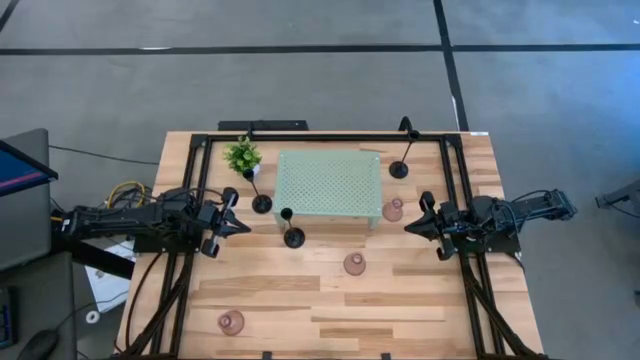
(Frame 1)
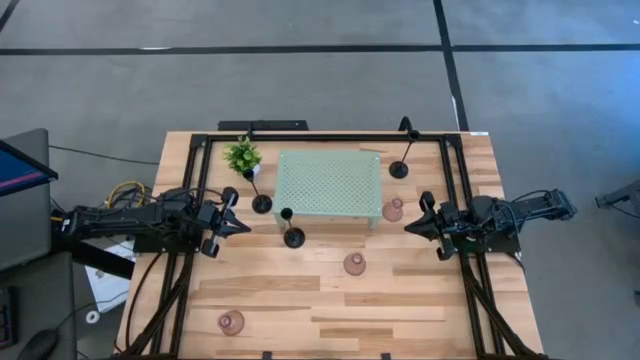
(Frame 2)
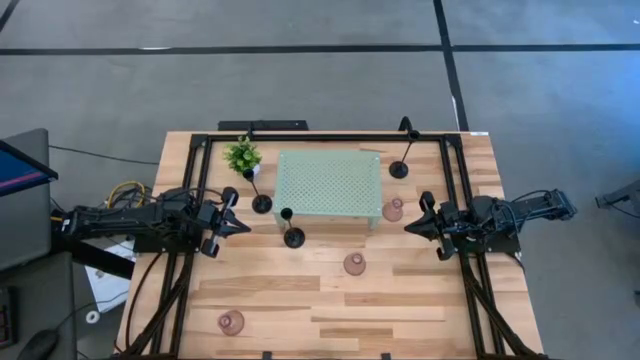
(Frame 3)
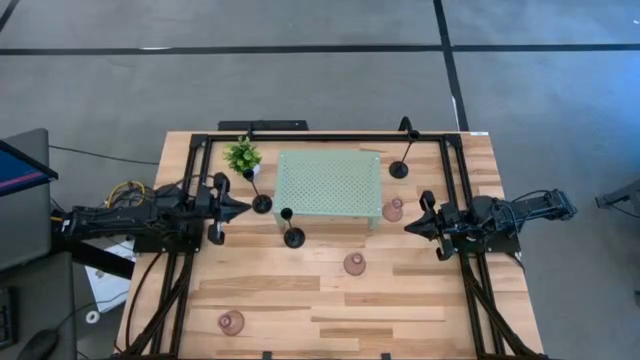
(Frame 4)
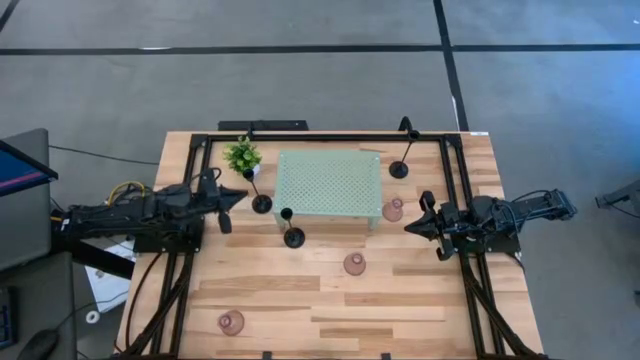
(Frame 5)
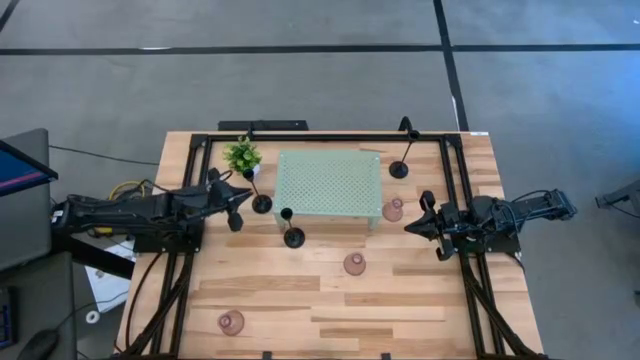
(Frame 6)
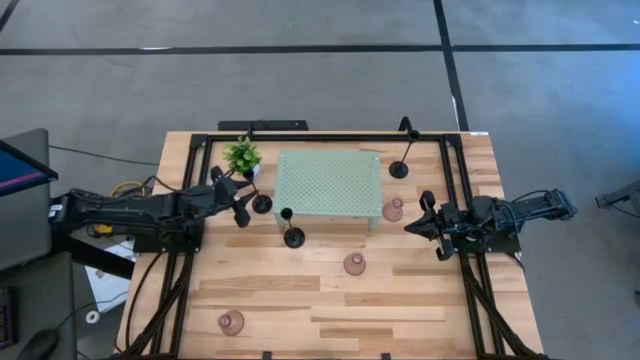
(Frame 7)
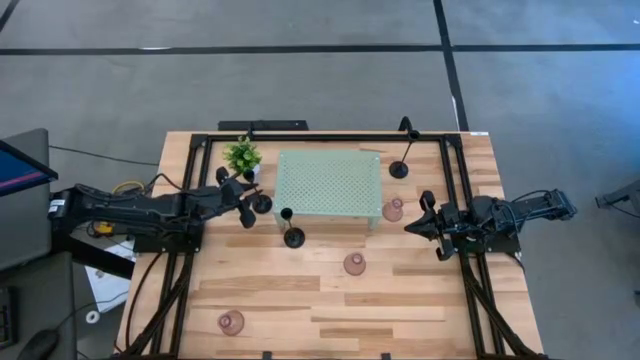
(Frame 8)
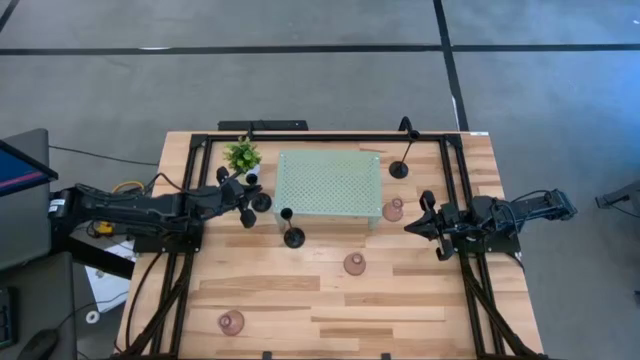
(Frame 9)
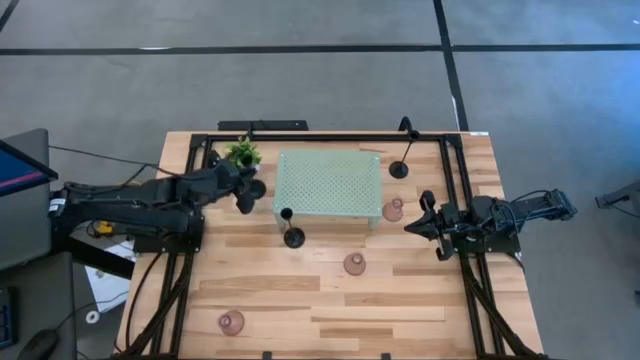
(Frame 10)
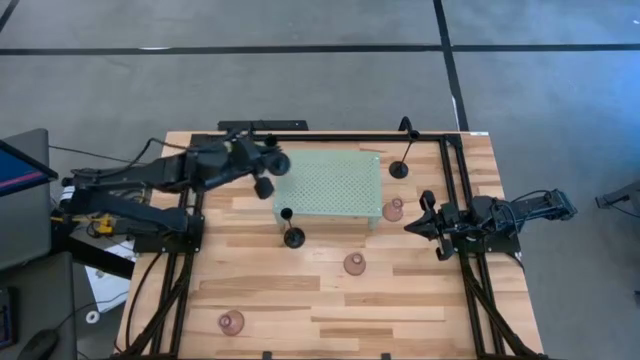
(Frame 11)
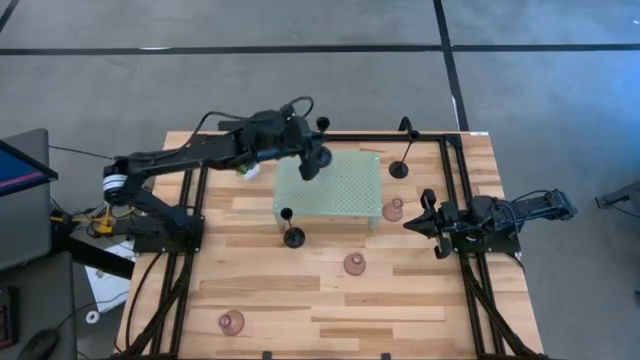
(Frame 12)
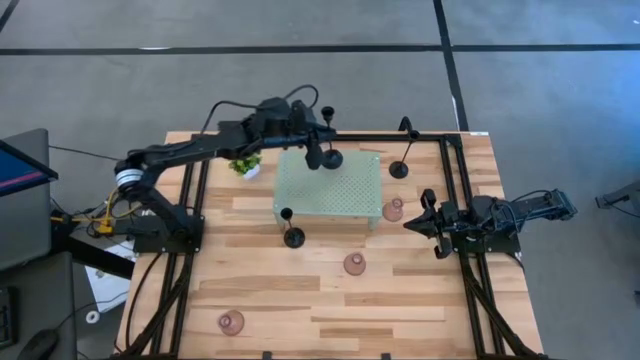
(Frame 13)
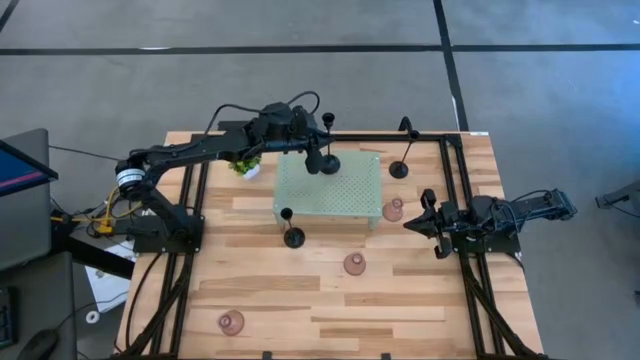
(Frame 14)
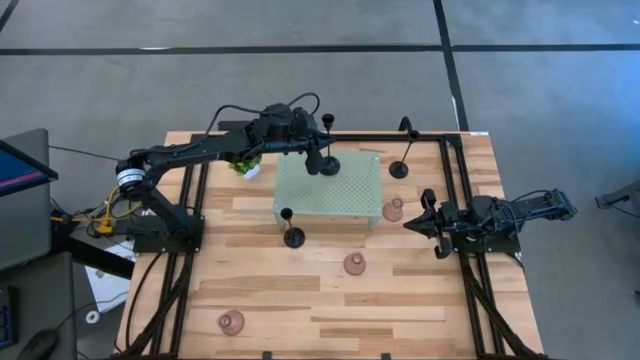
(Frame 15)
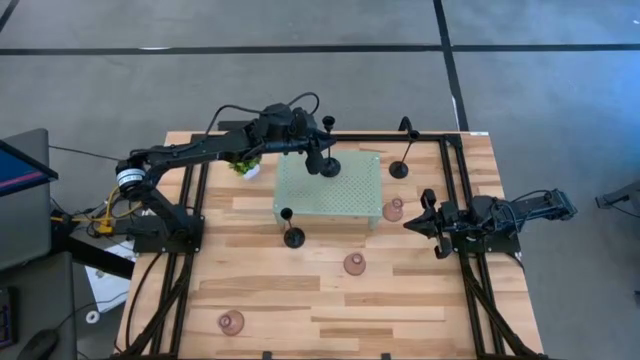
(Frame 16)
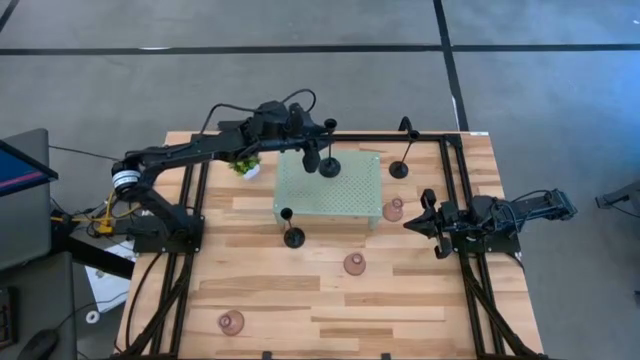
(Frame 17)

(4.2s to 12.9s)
Task: Pick & Place candle stick holders
Put the left black candle holder on the shelf

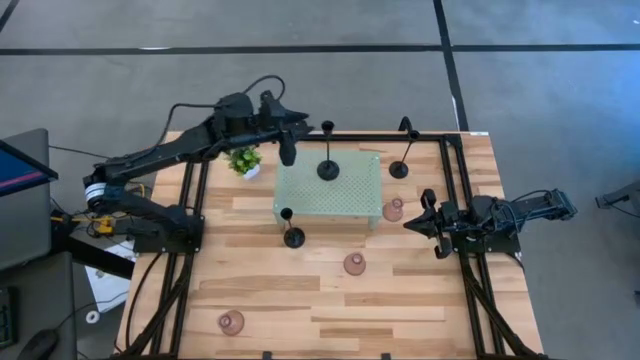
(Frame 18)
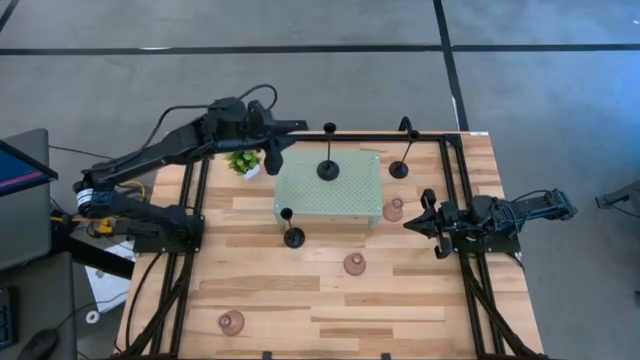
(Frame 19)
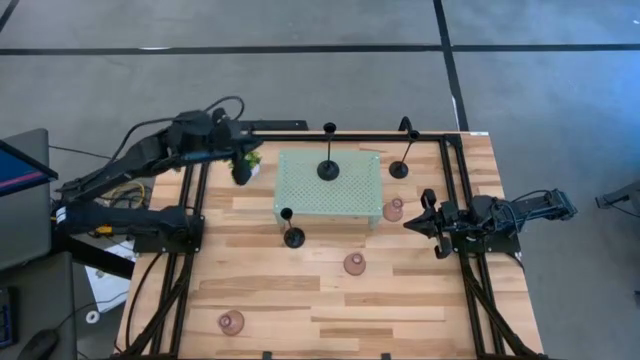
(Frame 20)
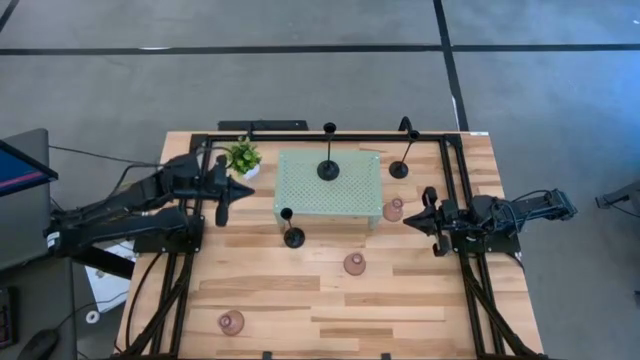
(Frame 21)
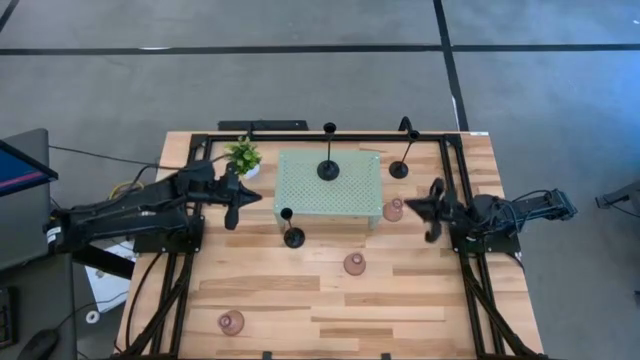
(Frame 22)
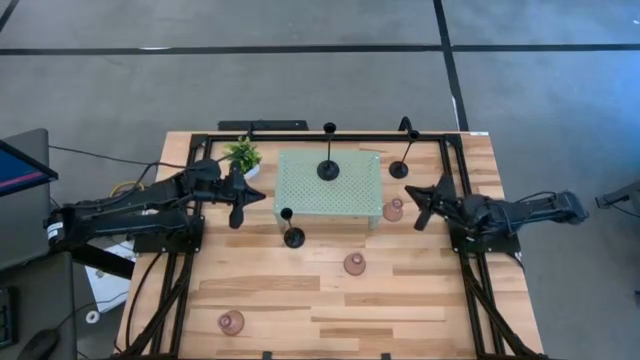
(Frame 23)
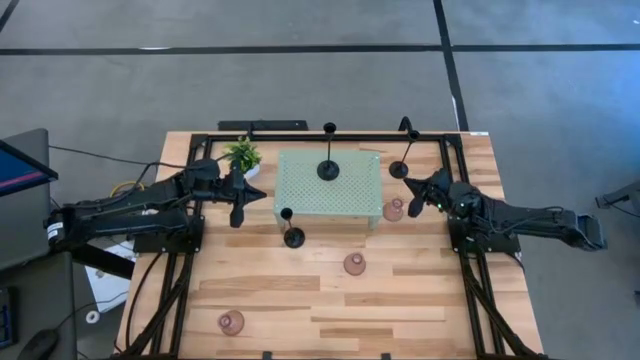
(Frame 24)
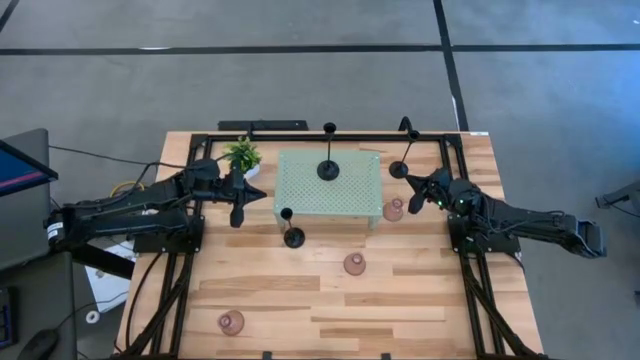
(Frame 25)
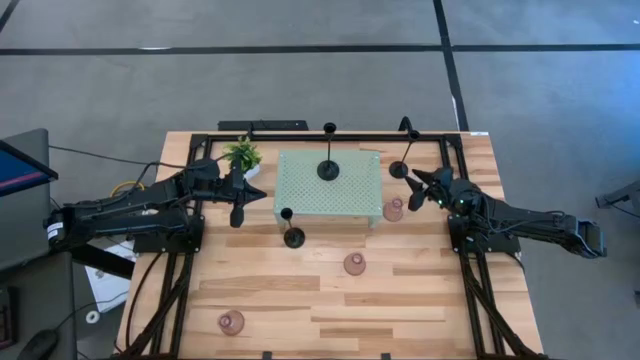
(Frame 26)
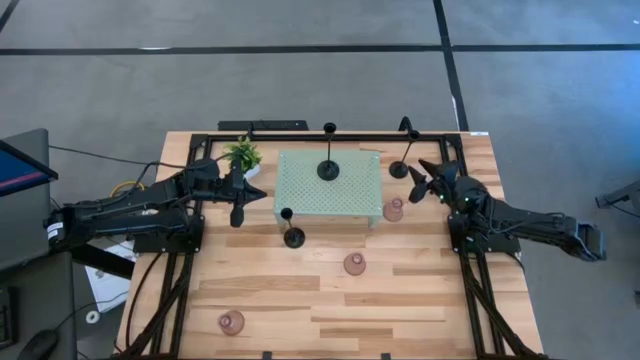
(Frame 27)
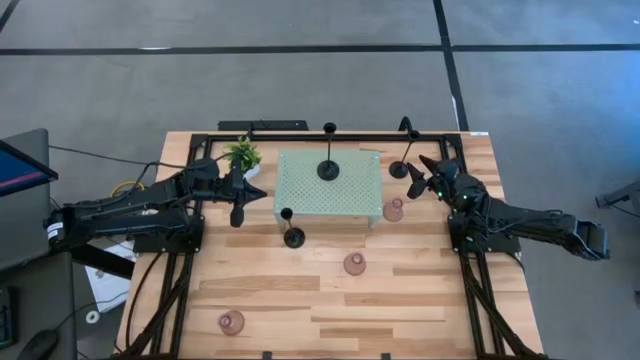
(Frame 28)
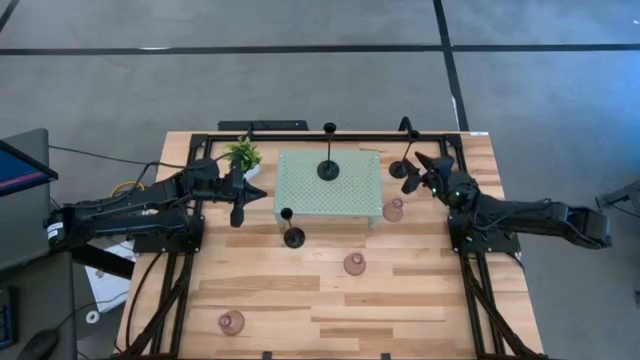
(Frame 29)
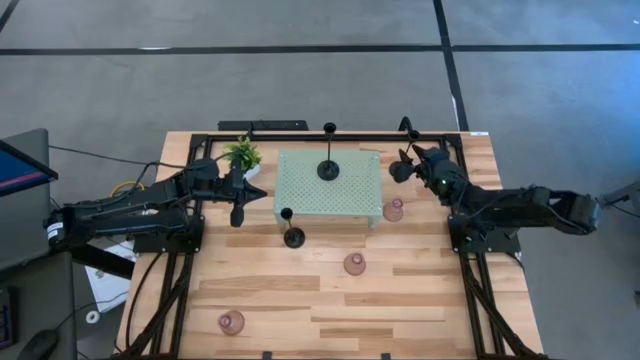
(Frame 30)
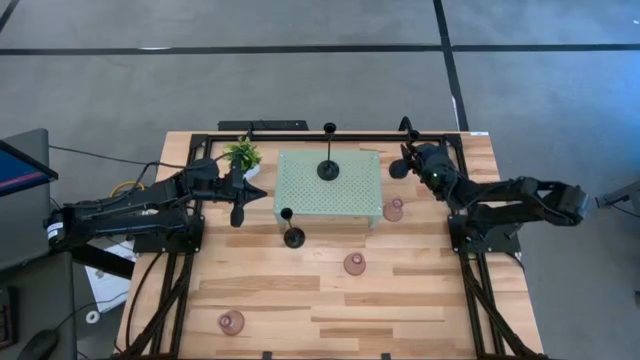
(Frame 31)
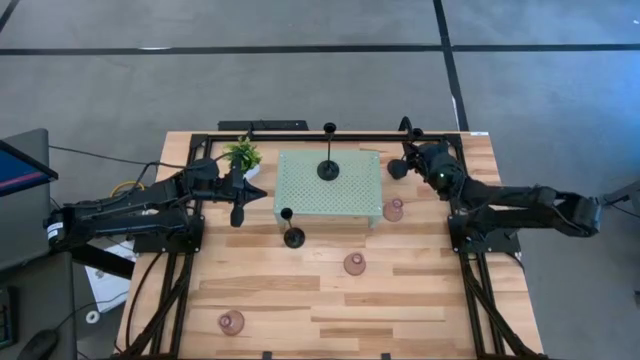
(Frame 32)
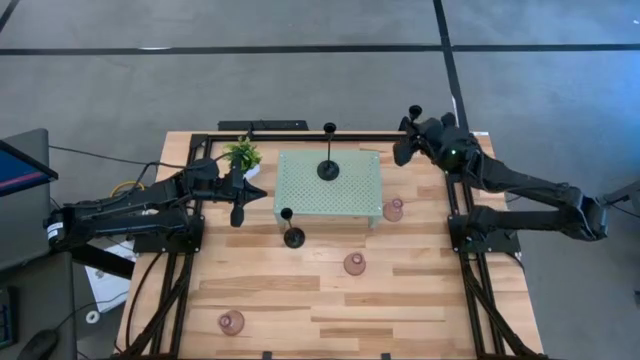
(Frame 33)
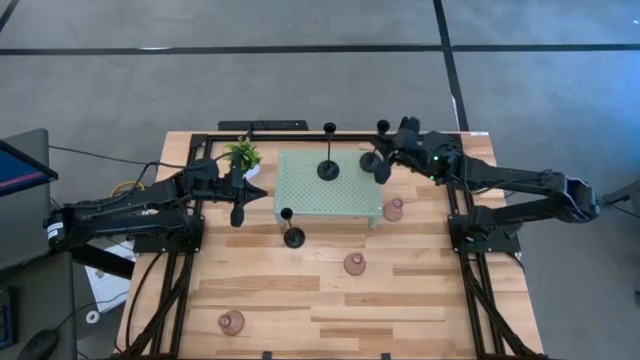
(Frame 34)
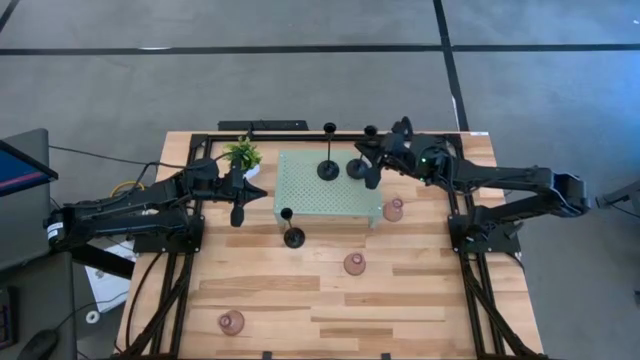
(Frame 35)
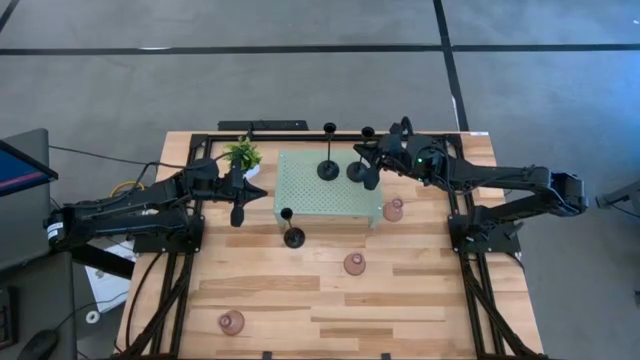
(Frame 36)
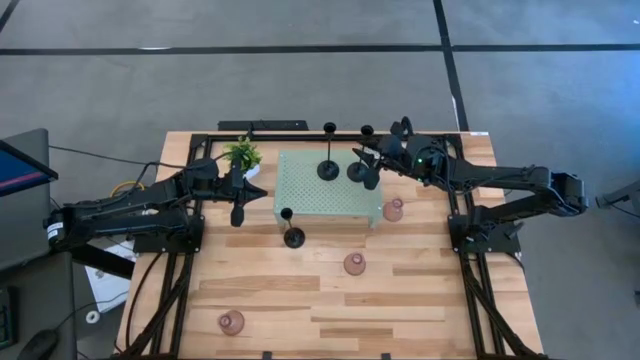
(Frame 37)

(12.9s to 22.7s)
Put the top black candle holder on the shelf

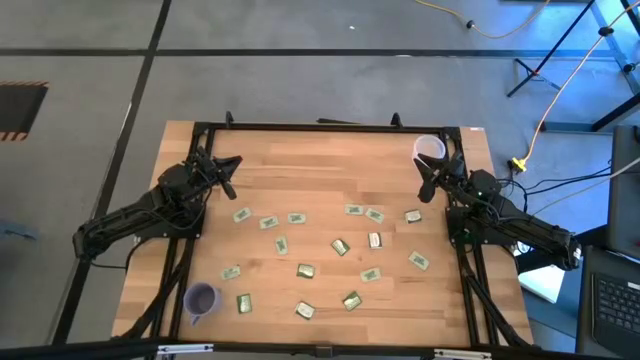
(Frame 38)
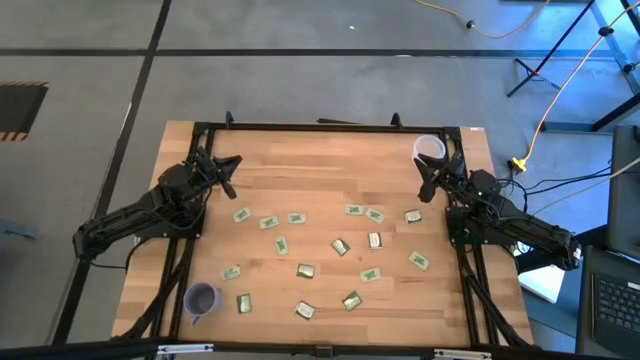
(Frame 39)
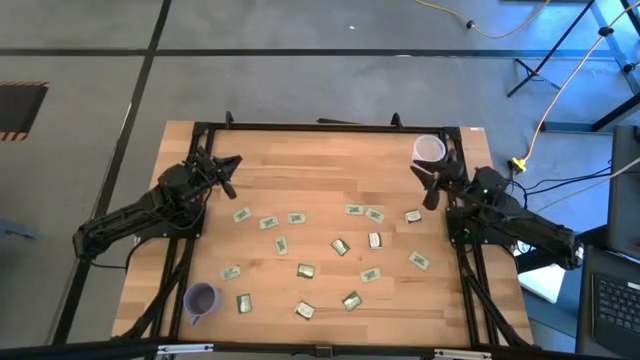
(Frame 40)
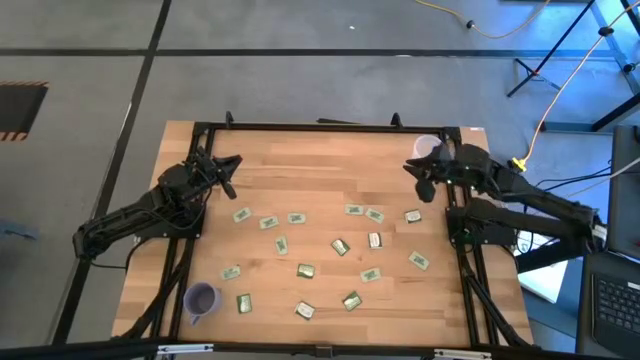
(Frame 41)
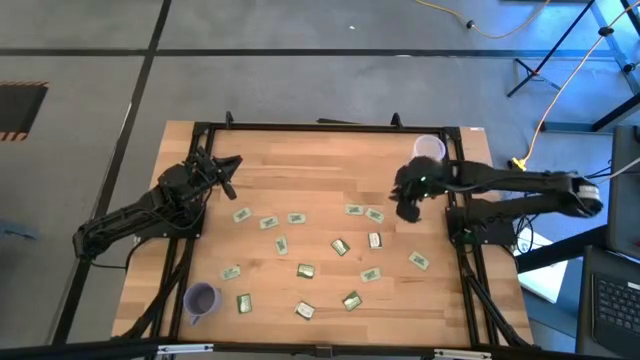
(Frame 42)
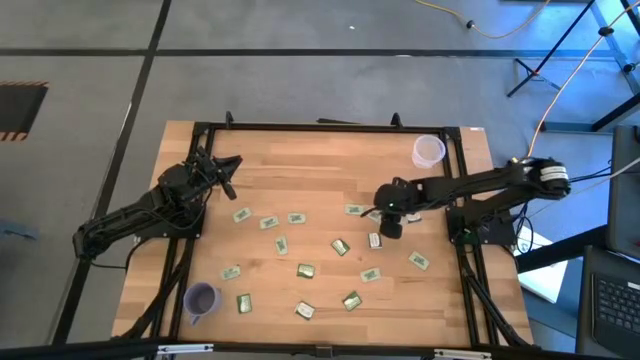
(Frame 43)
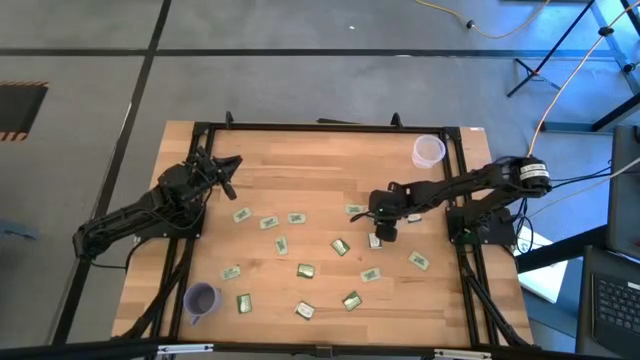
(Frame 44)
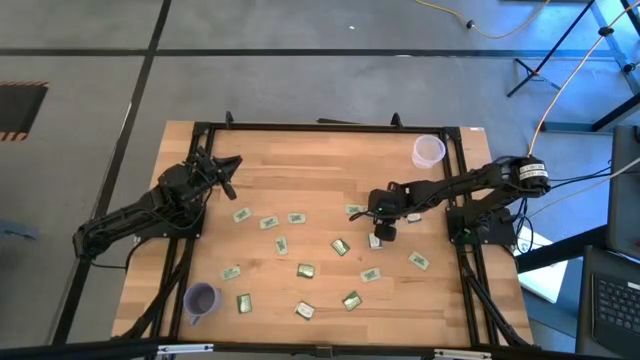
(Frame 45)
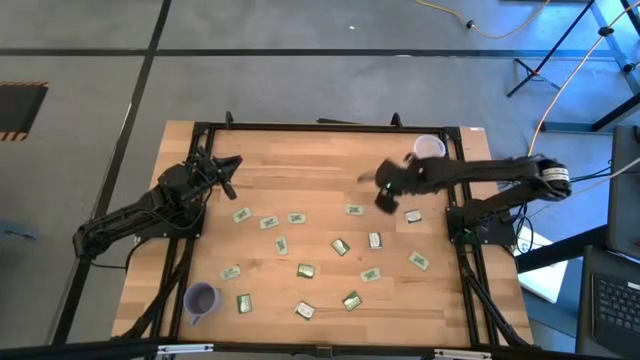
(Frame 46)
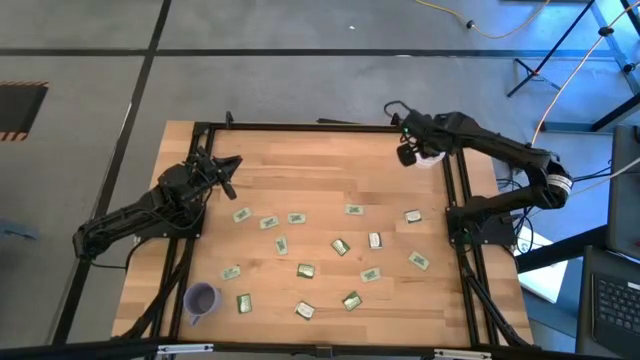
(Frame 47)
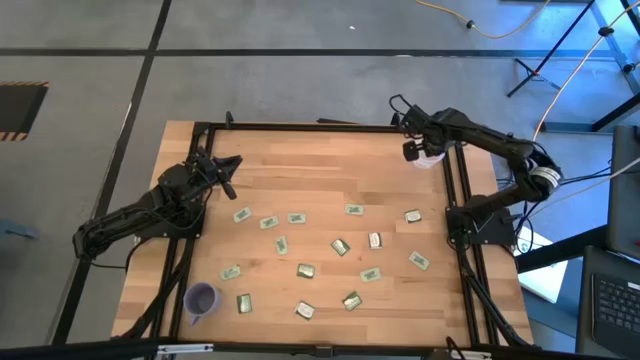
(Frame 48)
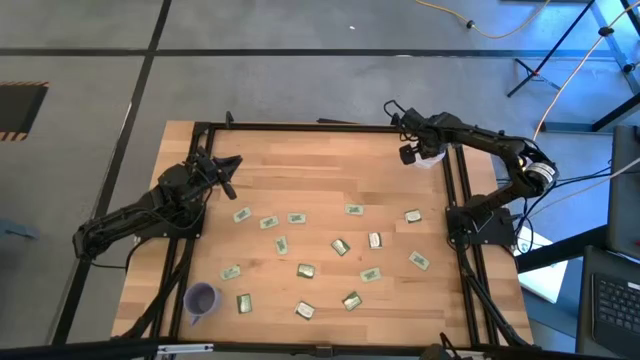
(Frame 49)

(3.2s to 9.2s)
Task: Pick and place Stevia / Truvia into bins
Put the light green stevia packet into the transparent container
